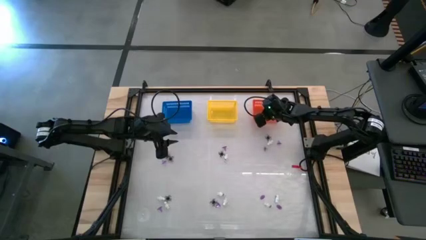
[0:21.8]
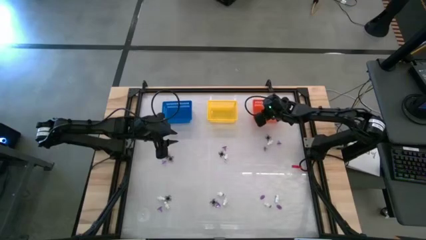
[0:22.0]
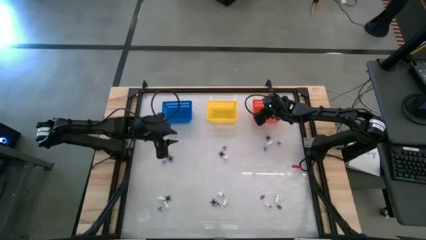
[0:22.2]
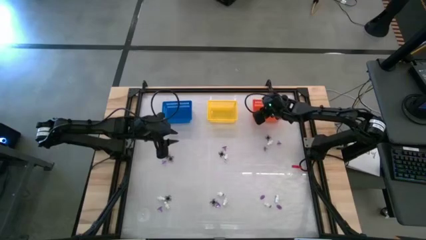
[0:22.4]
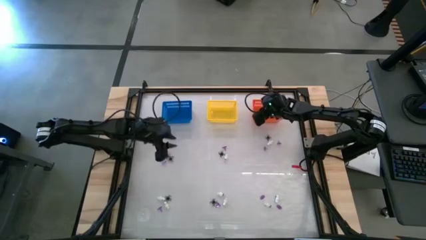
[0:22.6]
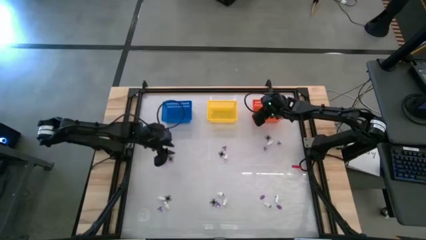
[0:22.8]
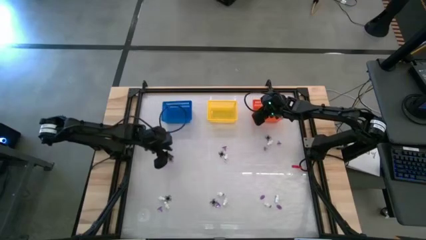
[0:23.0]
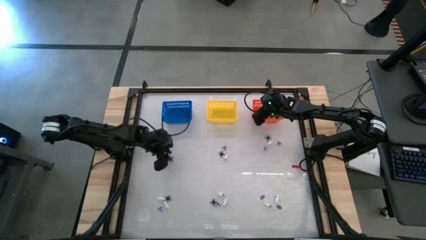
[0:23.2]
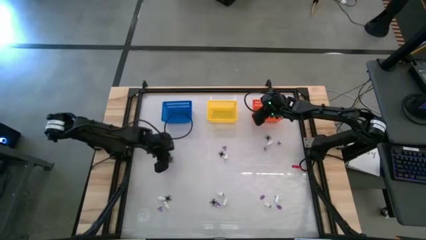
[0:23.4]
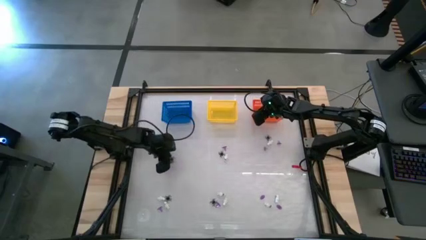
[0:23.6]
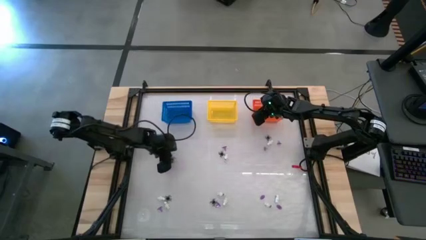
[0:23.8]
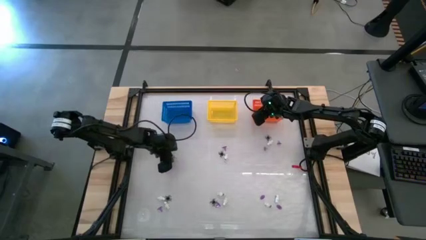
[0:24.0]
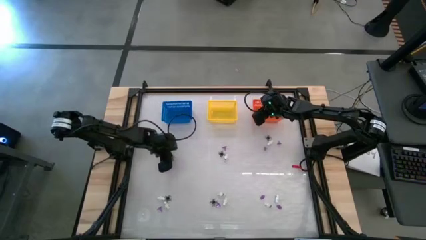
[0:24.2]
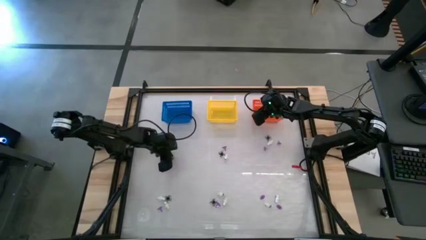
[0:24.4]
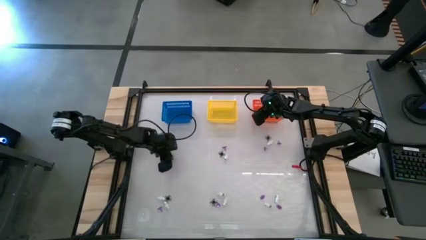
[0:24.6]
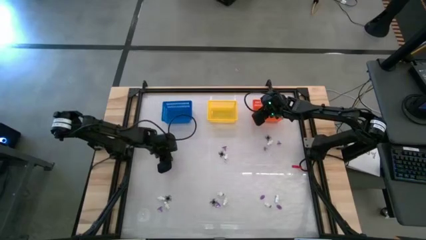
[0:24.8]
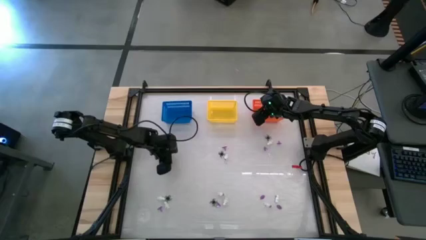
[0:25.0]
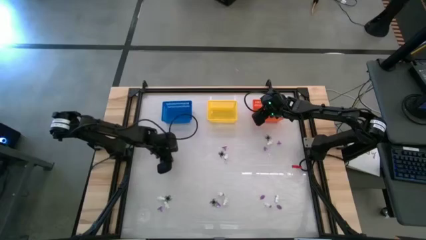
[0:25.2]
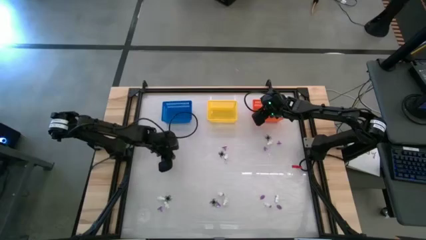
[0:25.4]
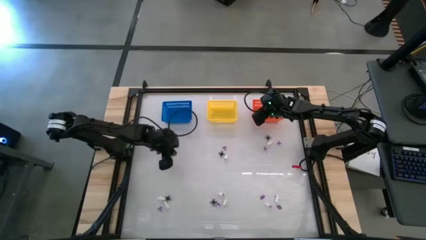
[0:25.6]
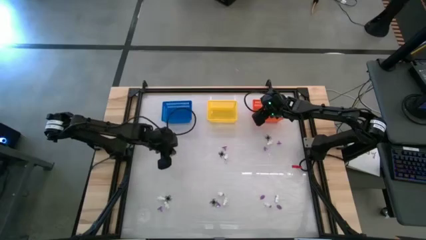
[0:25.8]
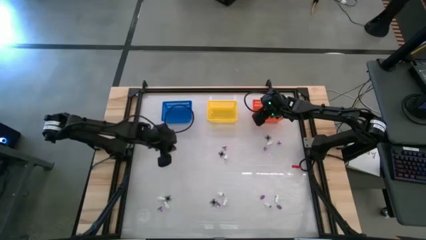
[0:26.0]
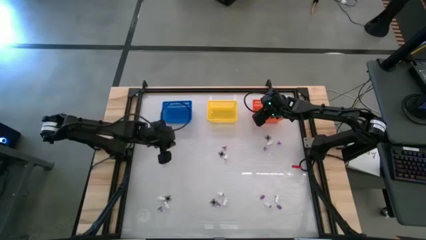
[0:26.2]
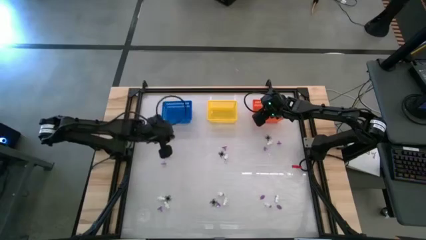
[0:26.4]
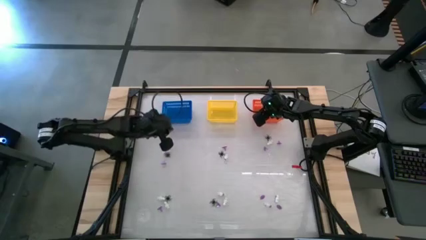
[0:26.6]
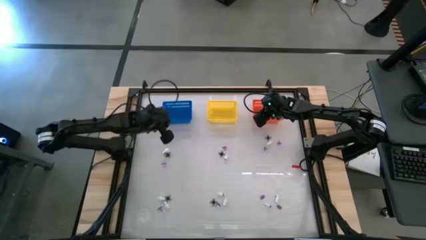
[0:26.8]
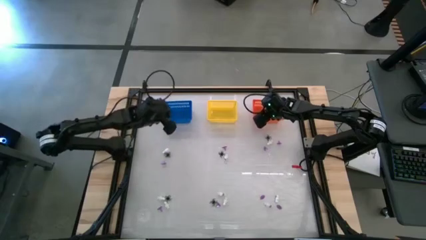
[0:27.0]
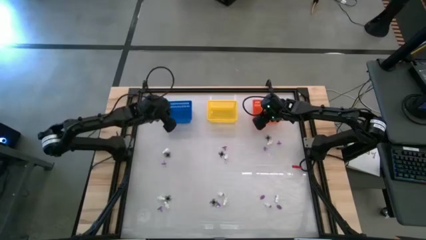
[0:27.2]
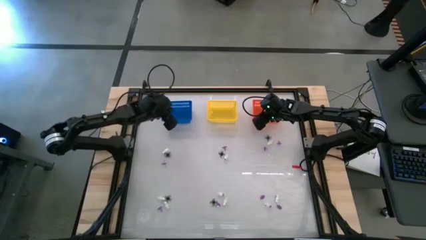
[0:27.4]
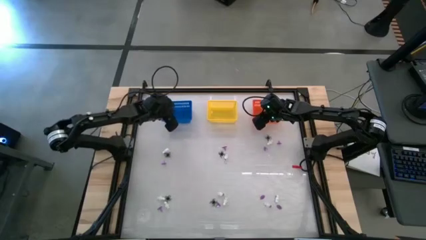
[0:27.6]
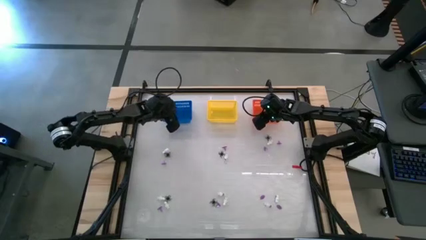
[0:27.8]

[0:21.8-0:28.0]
Task: Sort Halloween decoration
Put the black spider toy into the blue basket

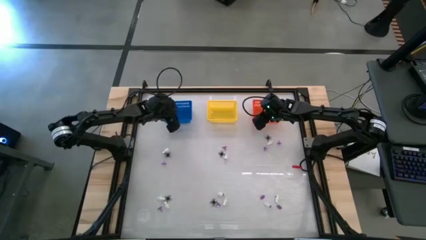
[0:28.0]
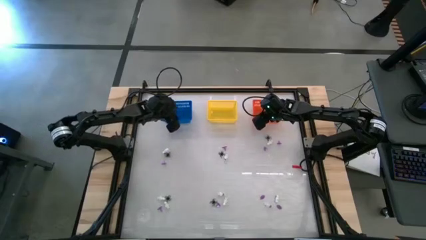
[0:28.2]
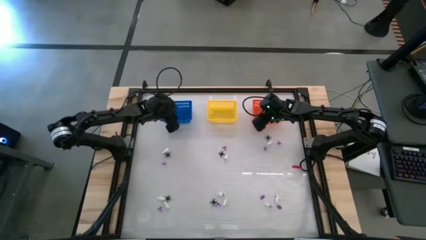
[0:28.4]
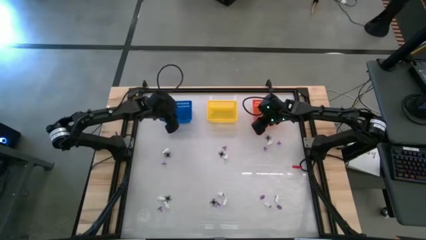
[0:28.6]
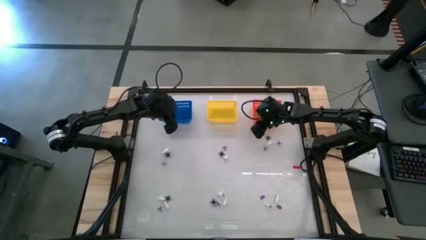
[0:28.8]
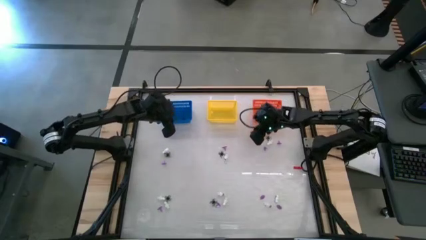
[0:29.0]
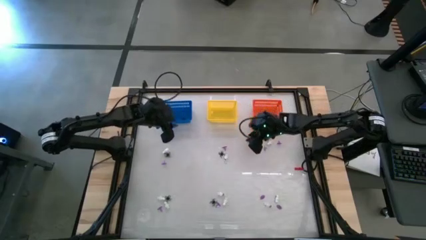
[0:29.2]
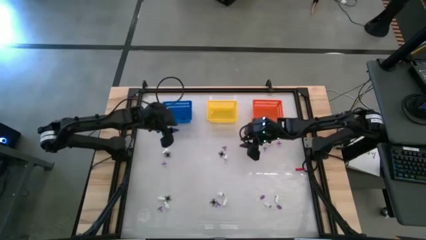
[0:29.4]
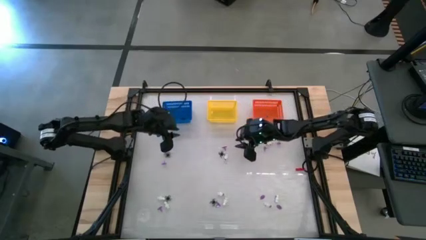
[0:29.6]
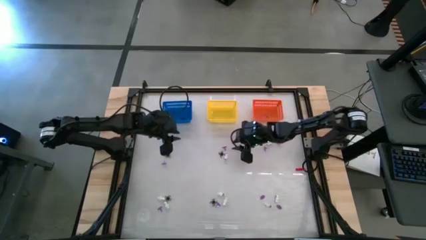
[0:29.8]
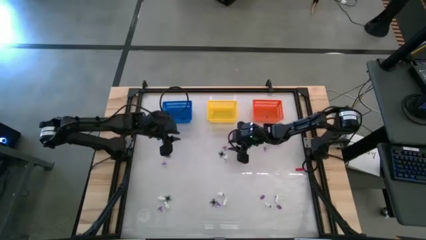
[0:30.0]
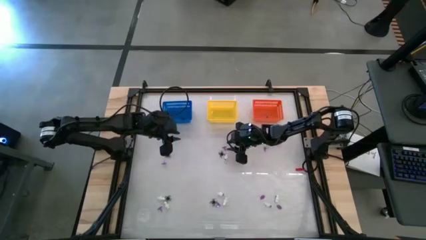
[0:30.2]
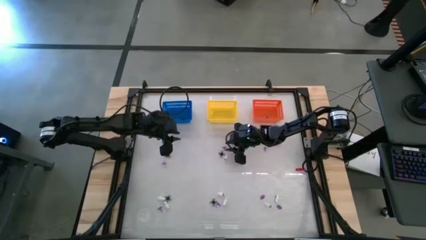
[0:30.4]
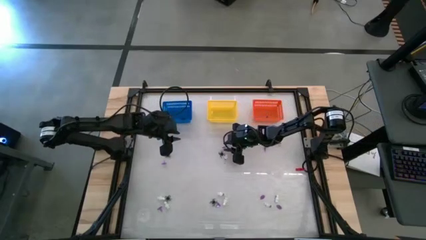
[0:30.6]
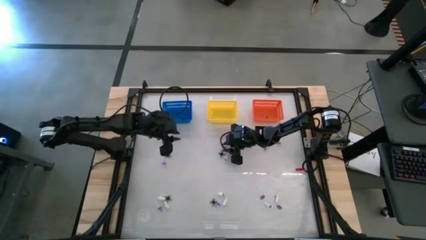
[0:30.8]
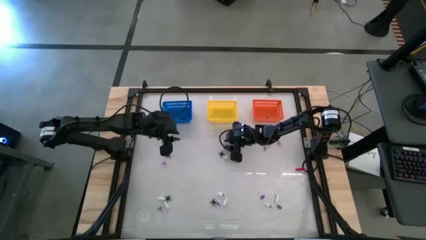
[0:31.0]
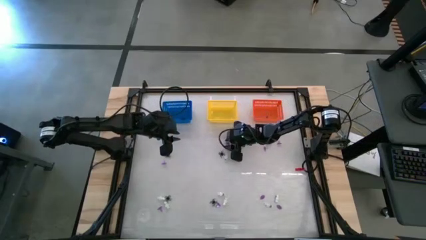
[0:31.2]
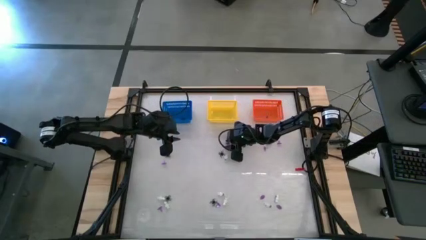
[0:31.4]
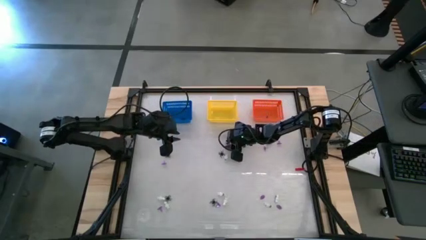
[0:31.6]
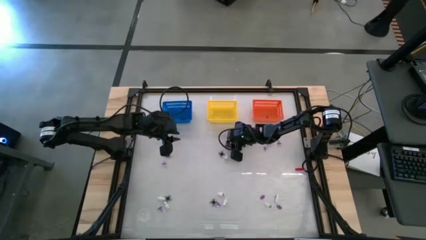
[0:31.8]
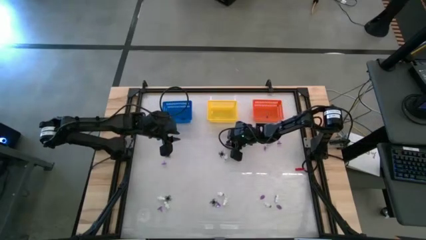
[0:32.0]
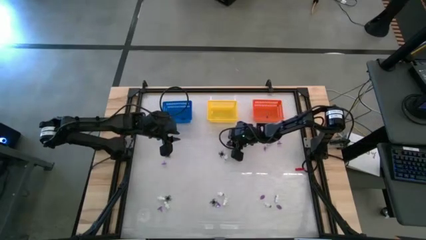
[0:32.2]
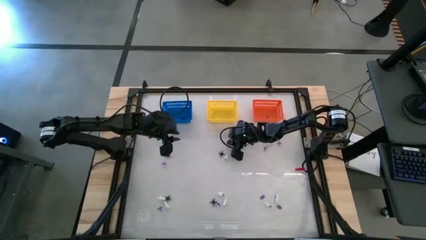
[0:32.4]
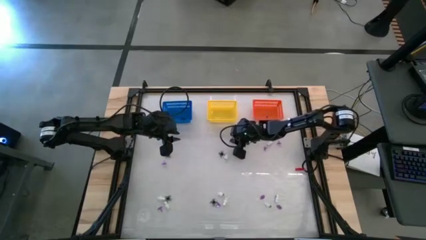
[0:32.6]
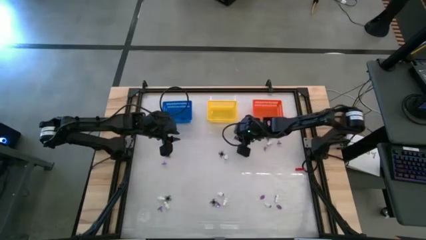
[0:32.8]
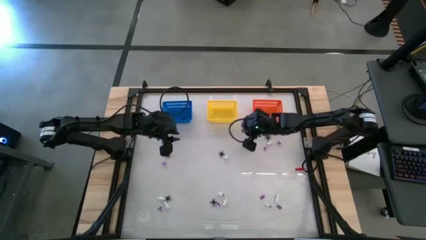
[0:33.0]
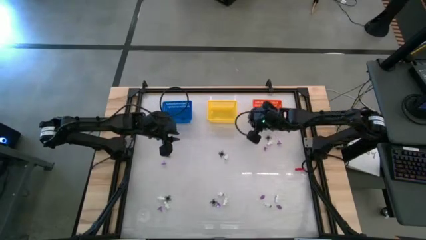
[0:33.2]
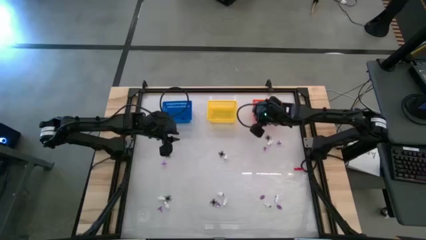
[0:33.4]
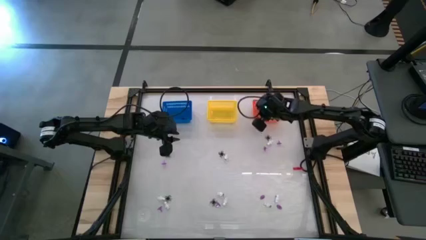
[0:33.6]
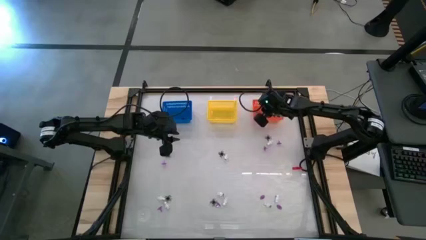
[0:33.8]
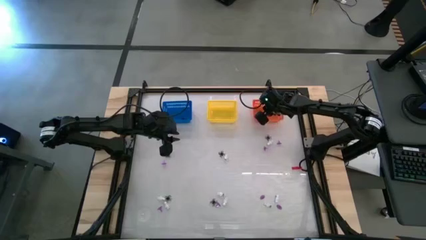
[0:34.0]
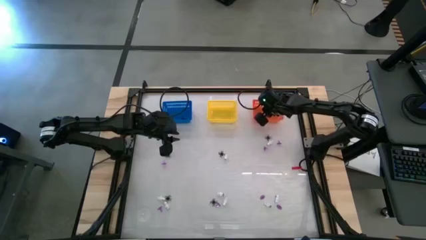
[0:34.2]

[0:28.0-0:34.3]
Put the purple witch hat toy into the orange basket

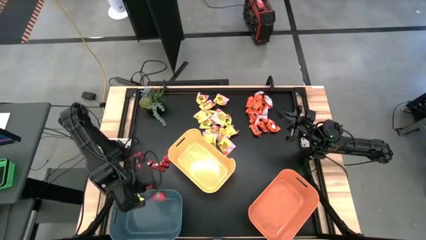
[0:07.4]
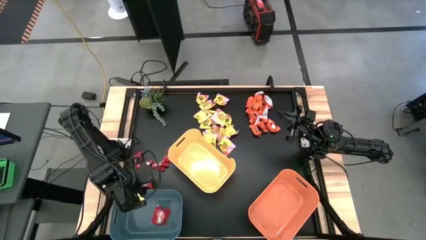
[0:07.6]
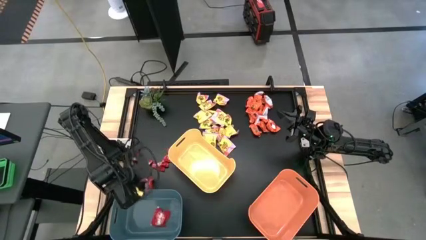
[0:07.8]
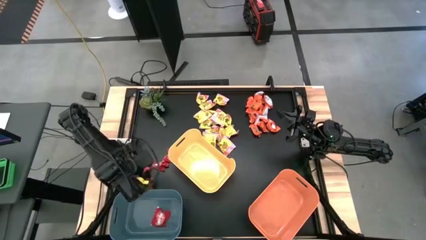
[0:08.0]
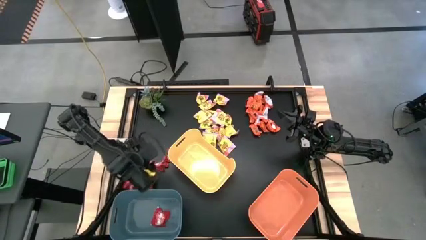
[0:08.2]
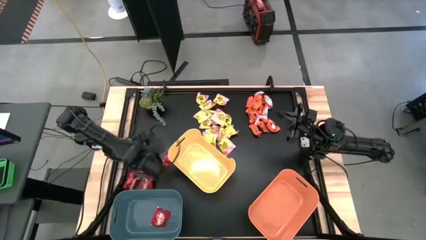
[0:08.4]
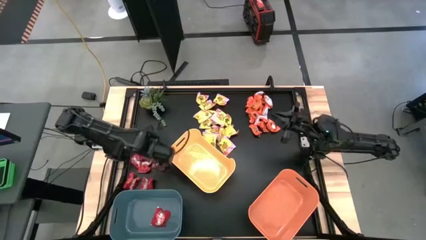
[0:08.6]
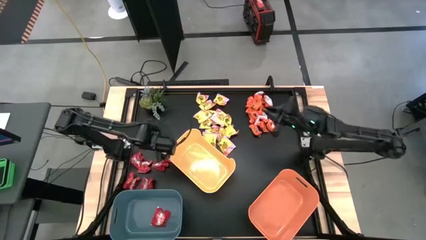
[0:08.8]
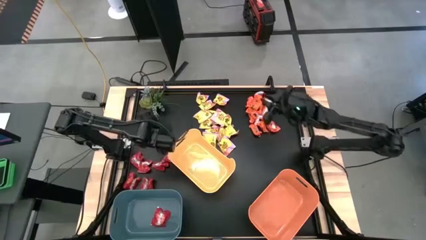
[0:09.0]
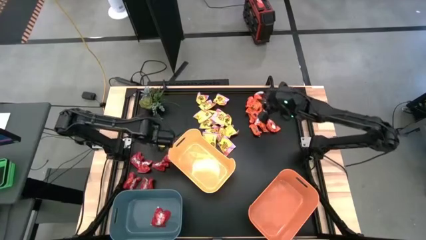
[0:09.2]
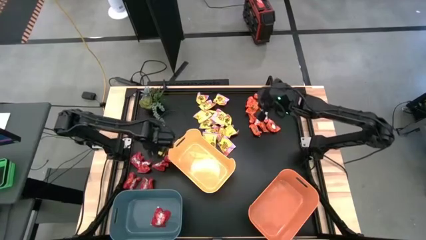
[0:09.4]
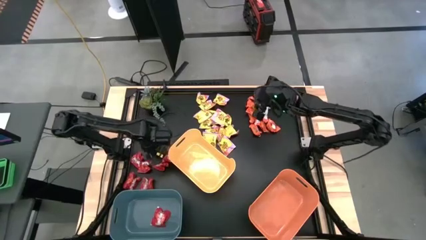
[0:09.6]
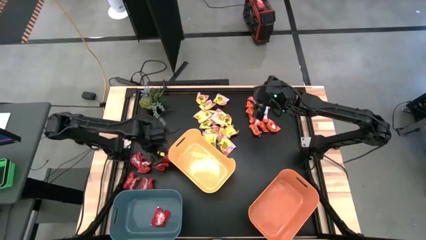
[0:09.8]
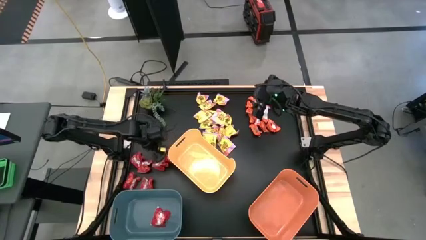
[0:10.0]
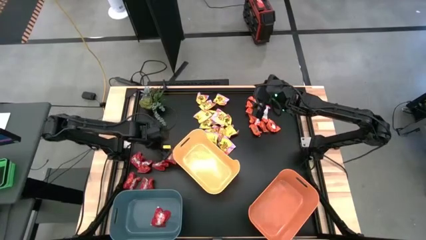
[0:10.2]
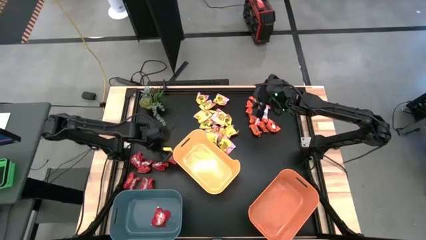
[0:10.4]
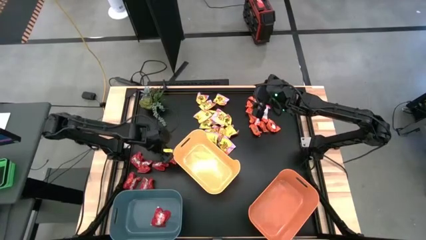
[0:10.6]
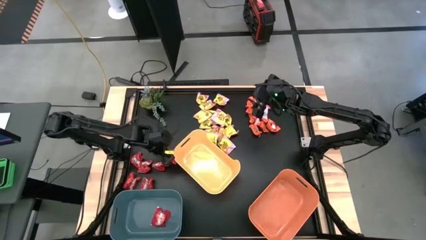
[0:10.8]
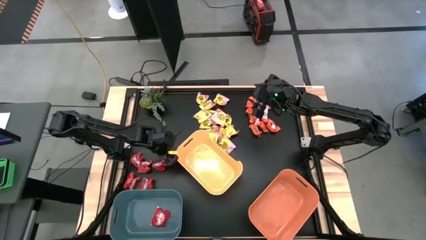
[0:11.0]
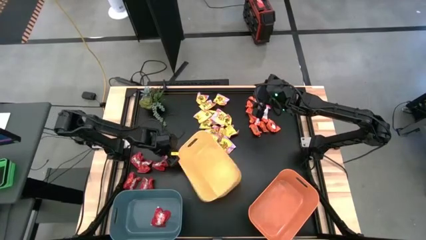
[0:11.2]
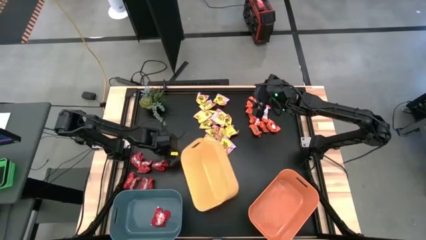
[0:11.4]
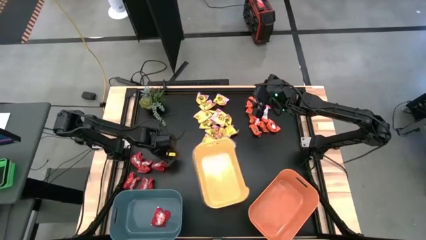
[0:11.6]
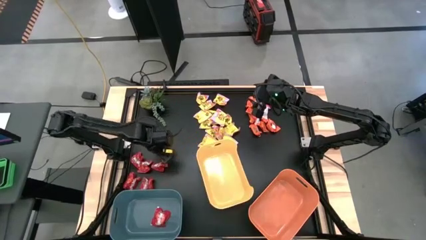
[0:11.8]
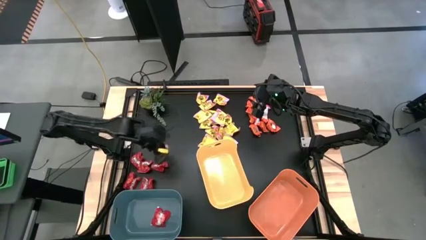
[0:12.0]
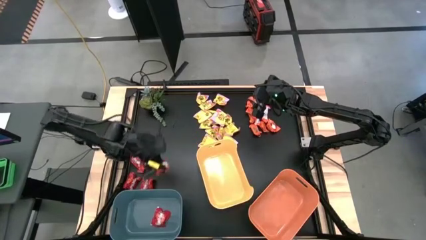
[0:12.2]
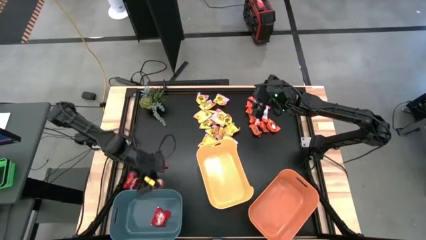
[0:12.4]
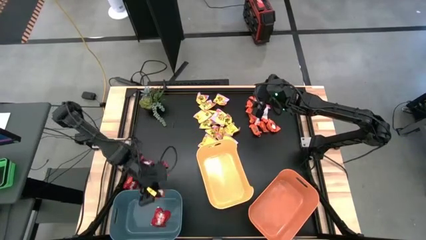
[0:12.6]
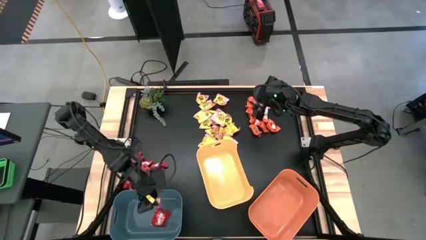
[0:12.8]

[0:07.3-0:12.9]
Task: Sort candy
Put the red candy into the blue bin
